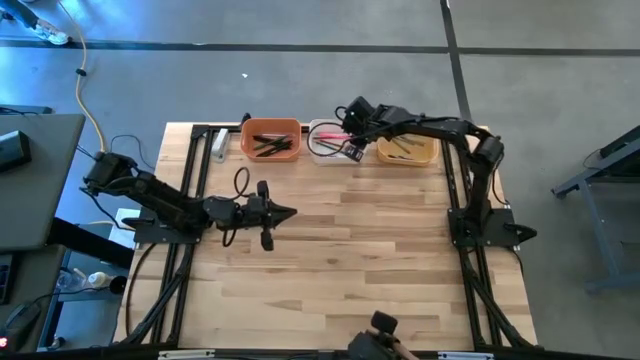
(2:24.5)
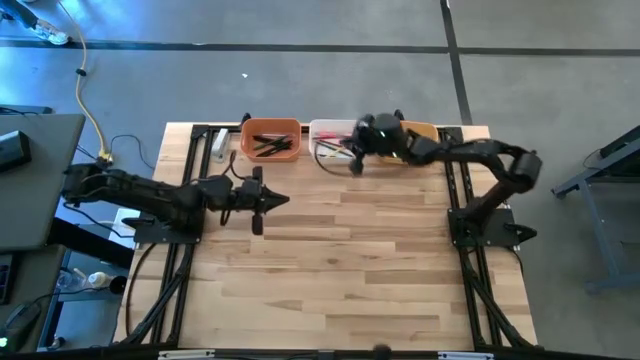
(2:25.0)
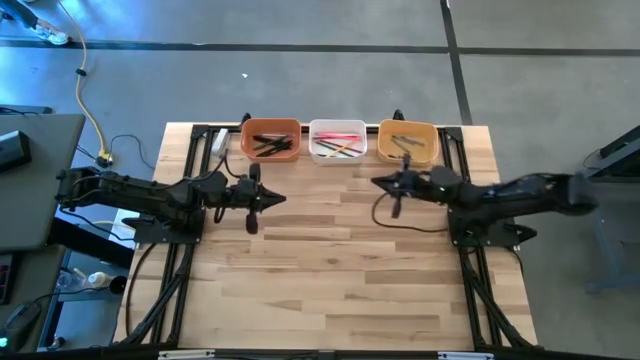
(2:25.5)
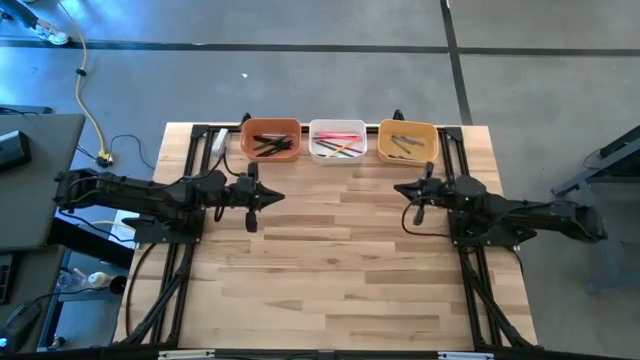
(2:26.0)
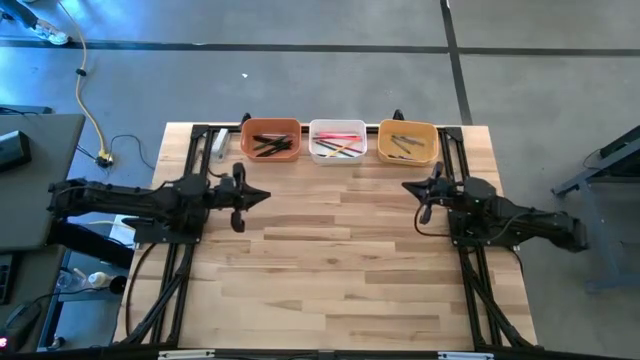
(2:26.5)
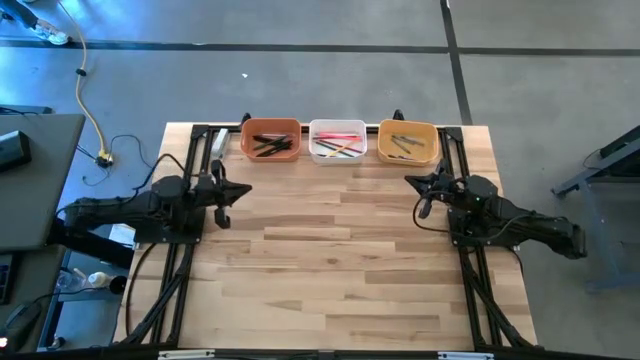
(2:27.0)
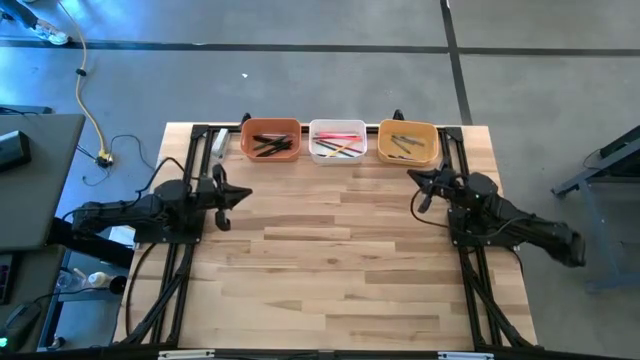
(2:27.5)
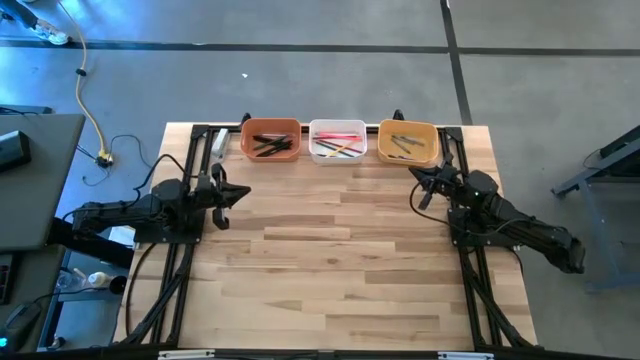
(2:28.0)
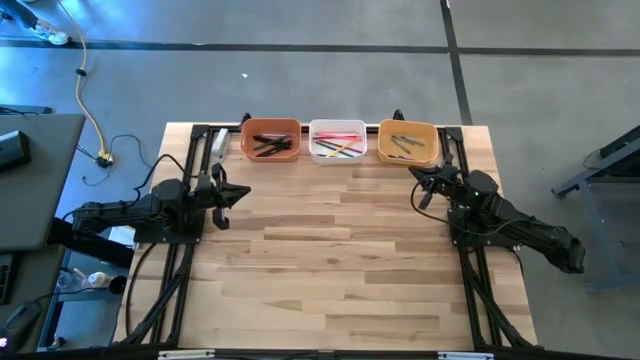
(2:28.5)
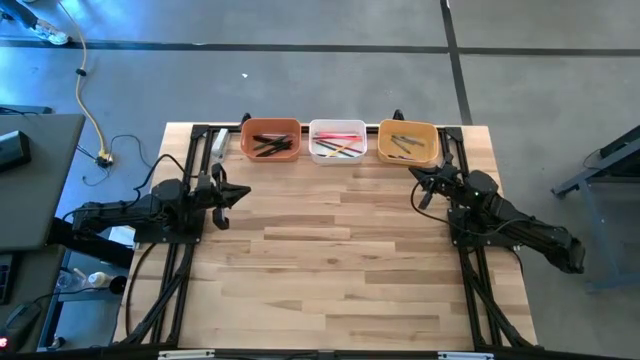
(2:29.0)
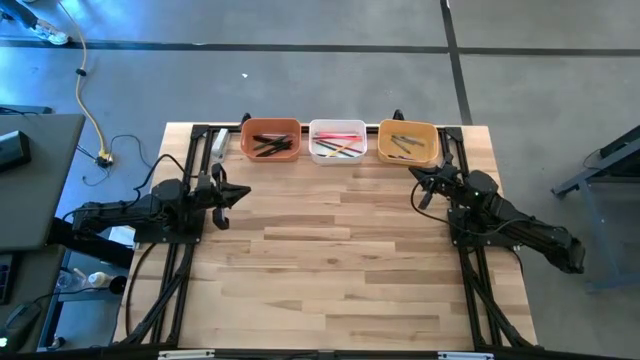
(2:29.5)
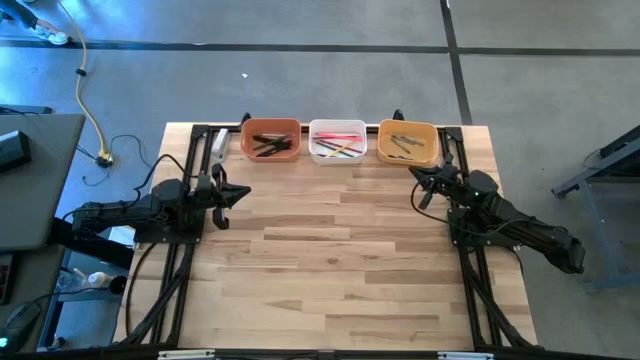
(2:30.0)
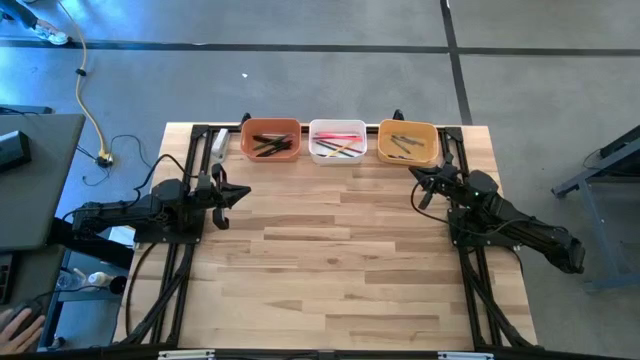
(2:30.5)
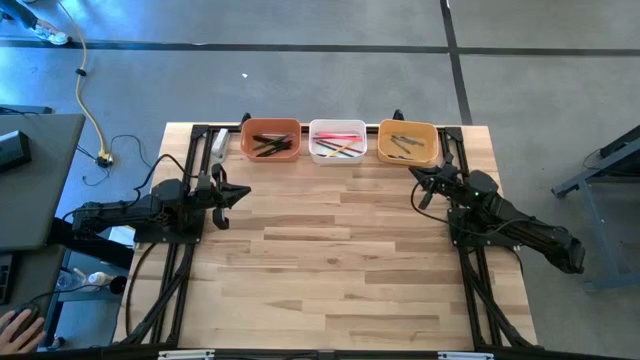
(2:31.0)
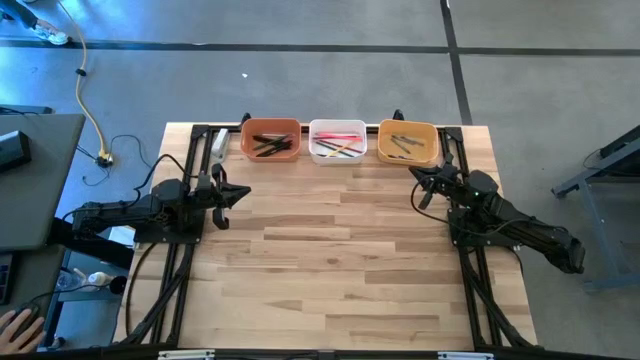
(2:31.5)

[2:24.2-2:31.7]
Task: Sort crayons/erasers/pens/pencils in bins
Return to Home Position

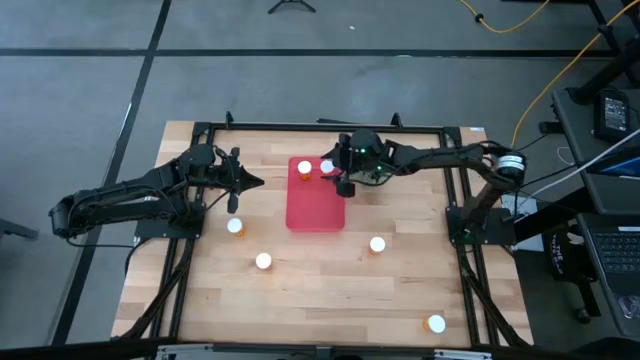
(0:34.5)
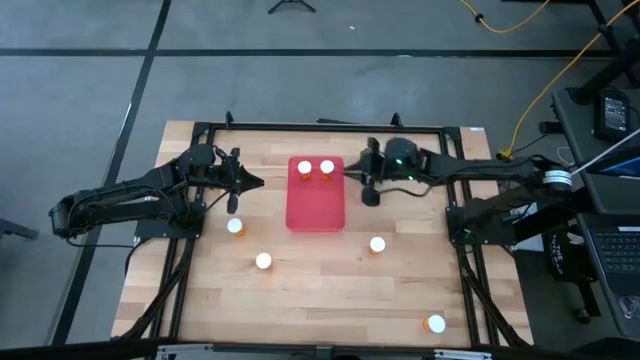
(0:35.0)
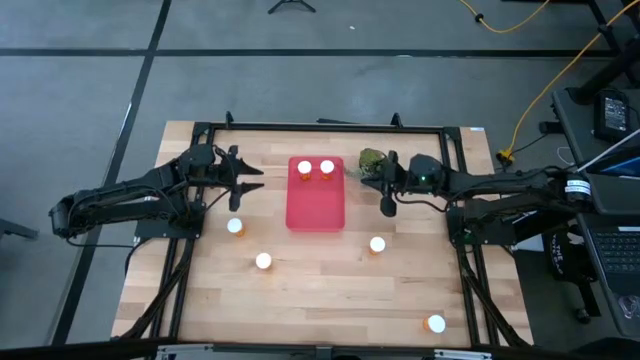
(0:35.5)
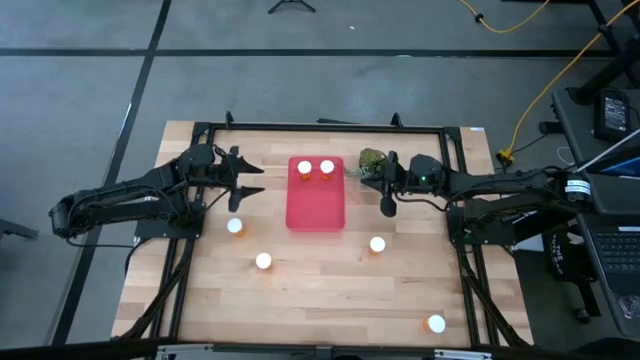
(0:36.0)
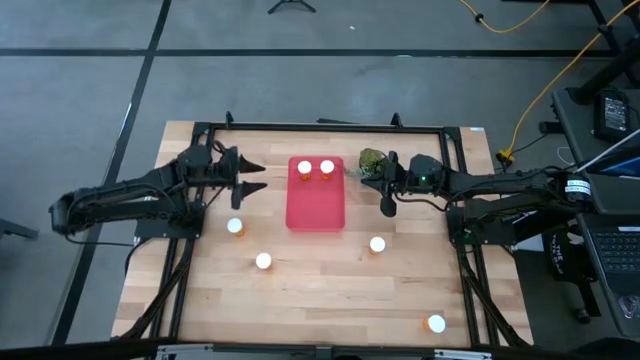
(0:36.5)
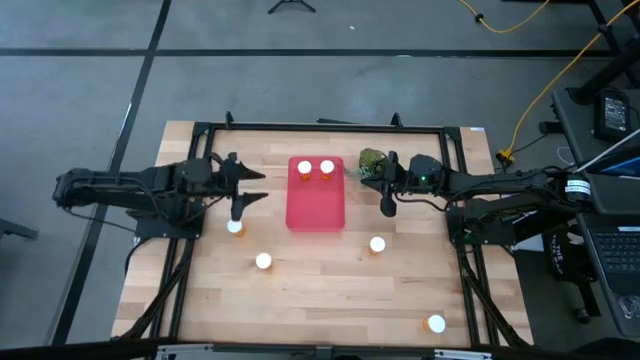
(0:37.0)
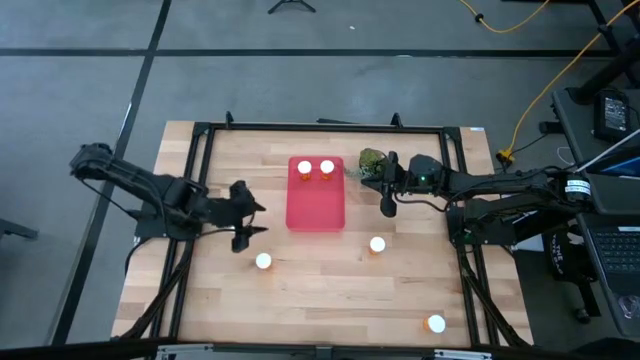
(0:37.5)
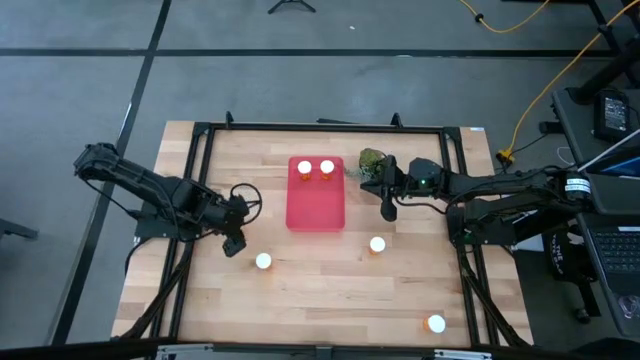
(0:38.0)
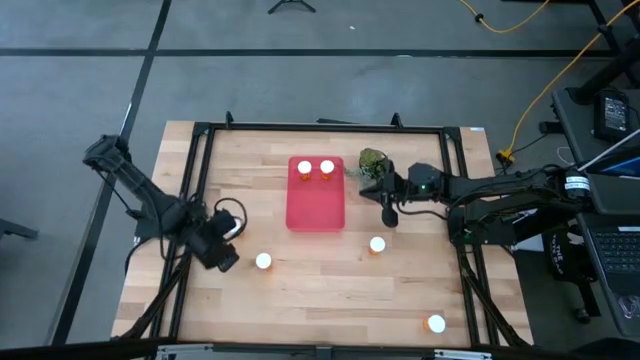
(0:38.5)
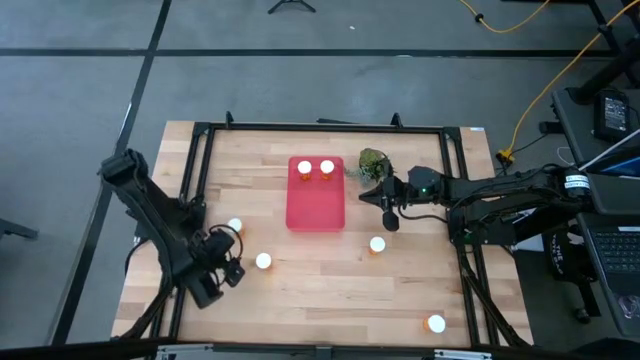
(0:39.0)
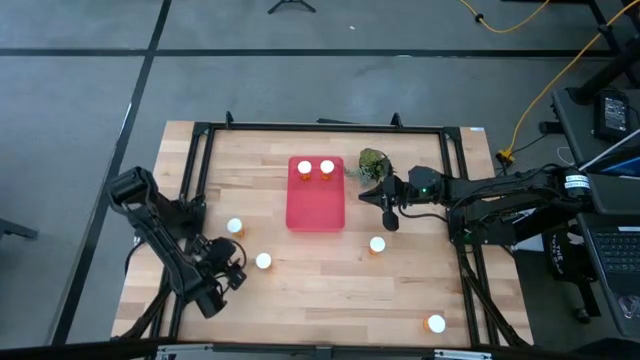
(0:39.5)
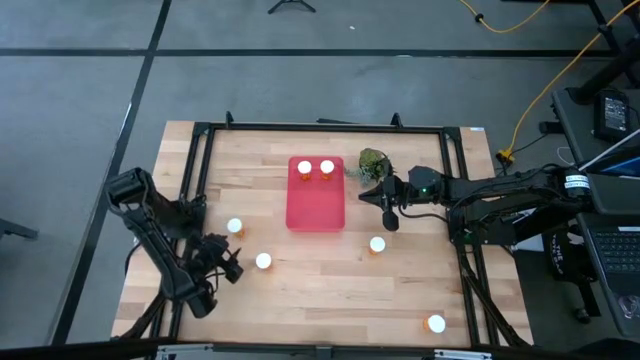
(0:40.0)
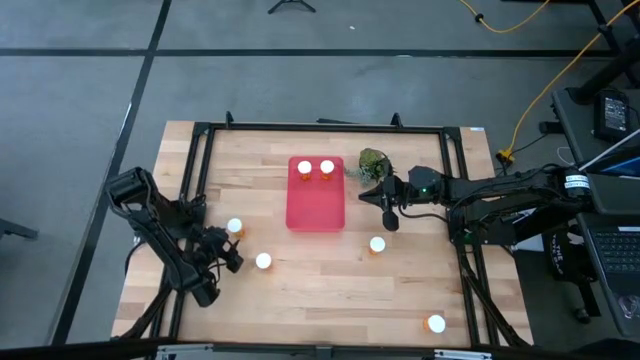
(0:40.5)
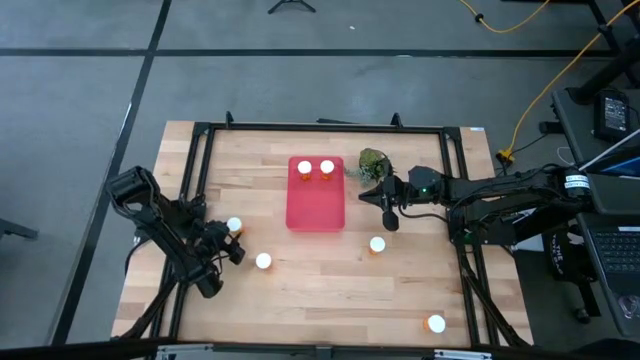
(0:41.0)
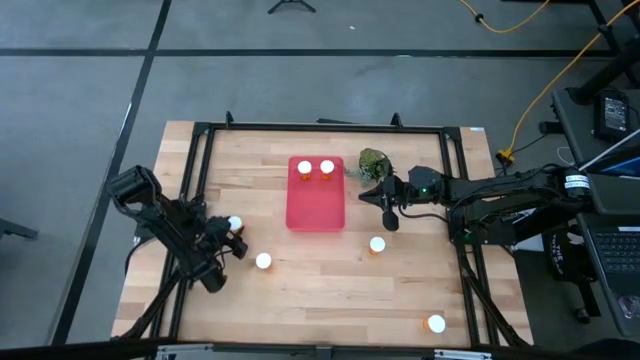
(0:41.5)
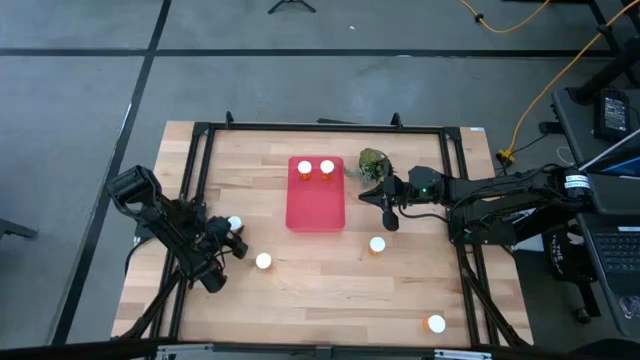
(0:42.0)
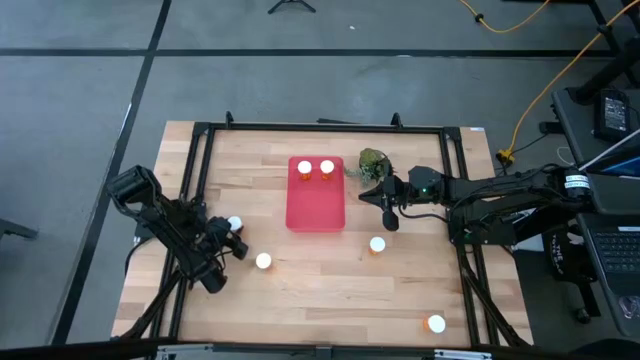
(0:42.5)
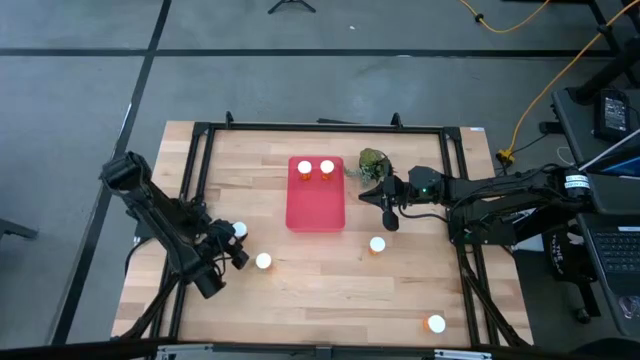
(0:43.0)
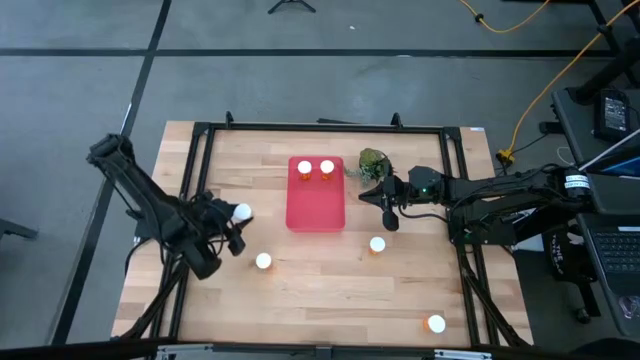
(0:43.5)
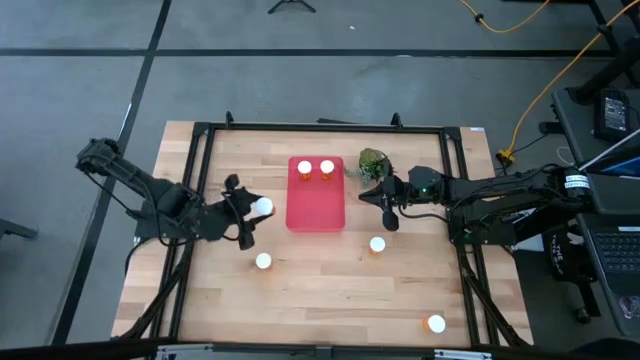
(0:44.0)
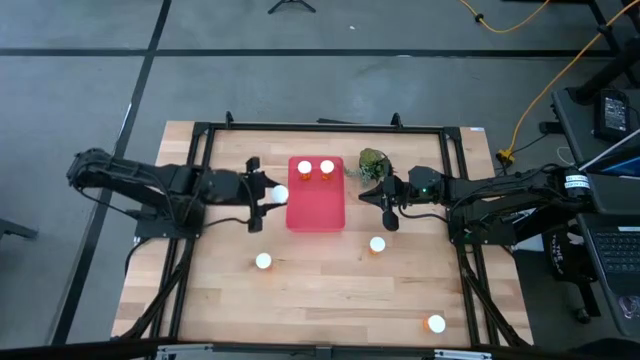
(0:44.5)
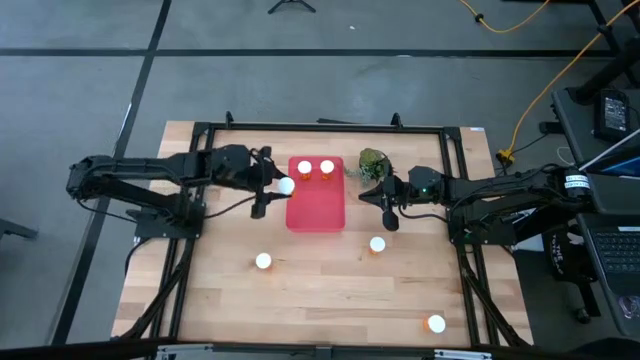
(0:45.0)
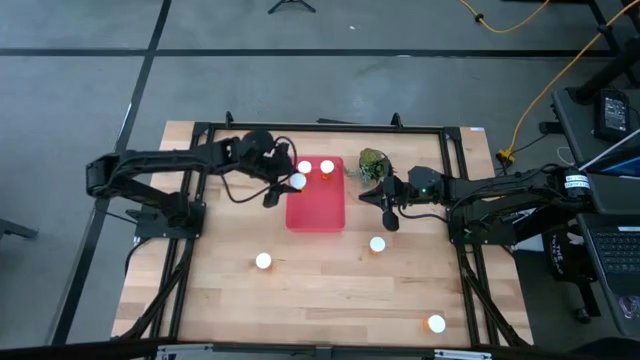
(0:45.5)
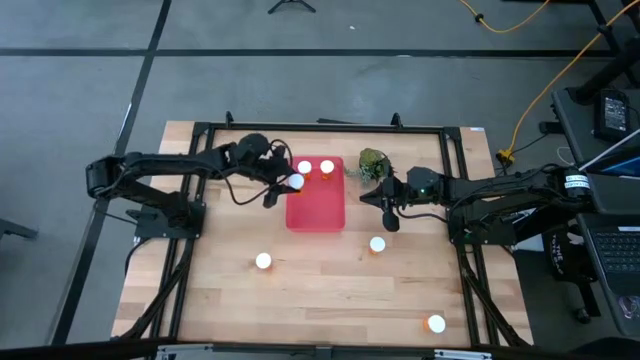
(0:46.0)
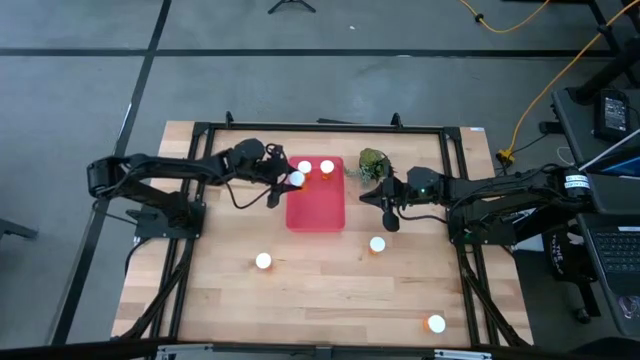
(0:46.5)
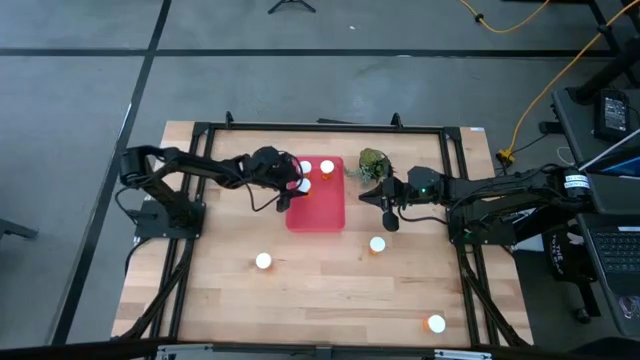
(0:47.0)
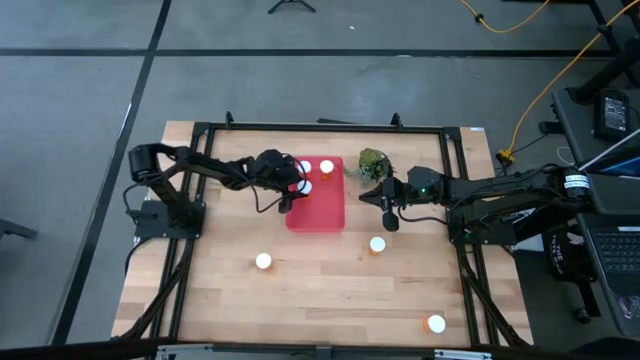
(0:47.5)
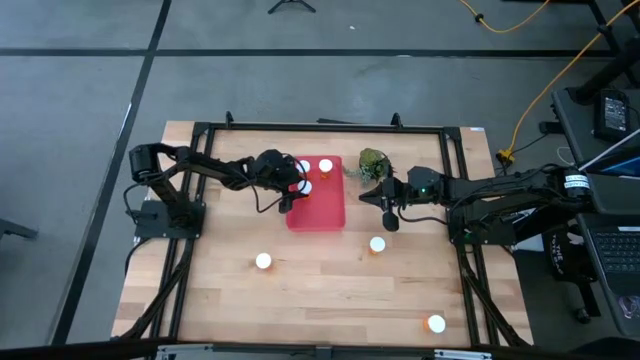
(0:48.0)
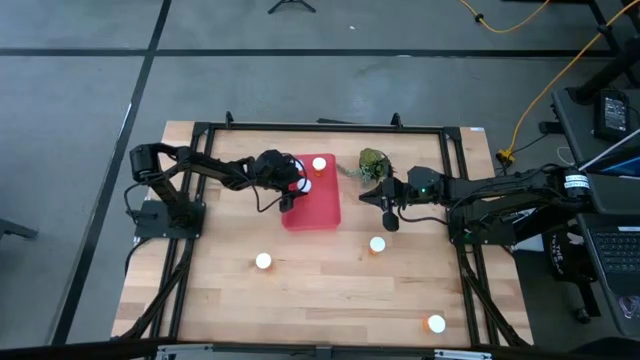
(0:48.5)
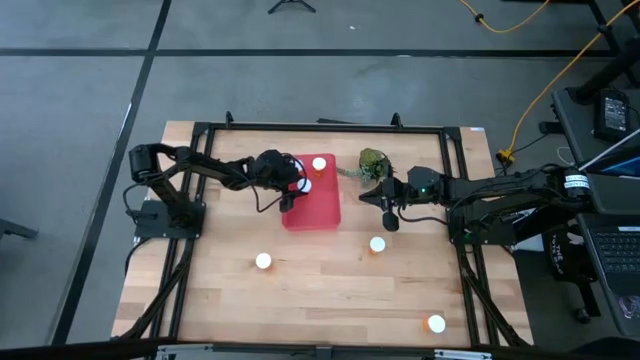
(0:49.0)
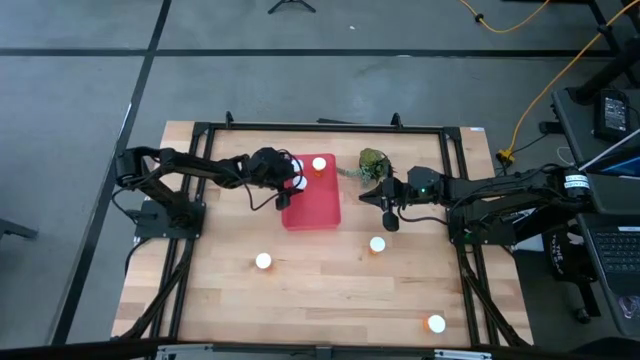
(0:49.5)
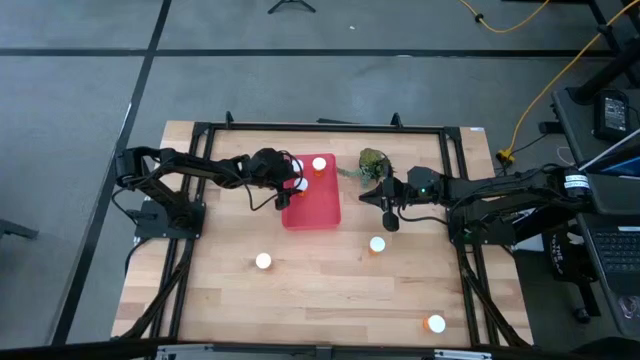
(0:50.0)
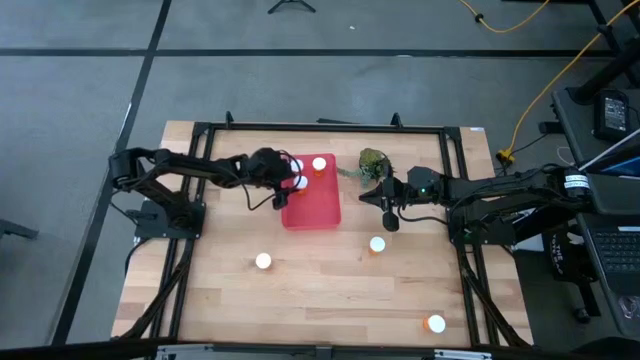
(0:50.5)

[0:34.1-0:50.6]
Task: Pick and place pill bottles into a basket
Put the orange pill bottle into the red bin
